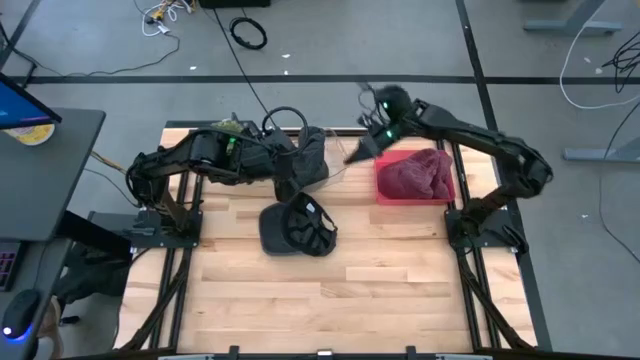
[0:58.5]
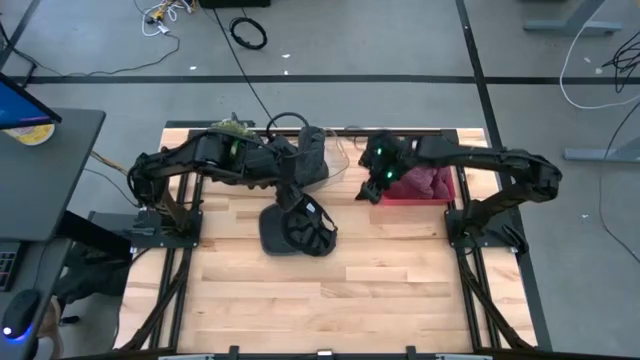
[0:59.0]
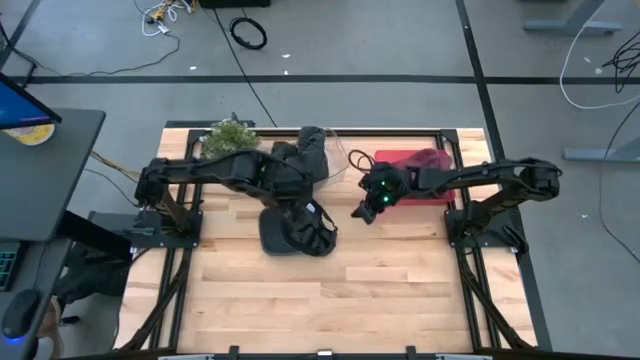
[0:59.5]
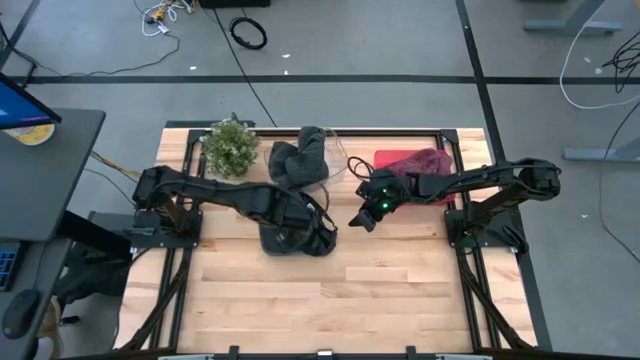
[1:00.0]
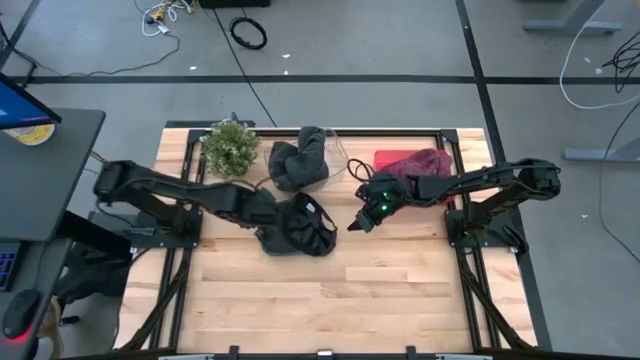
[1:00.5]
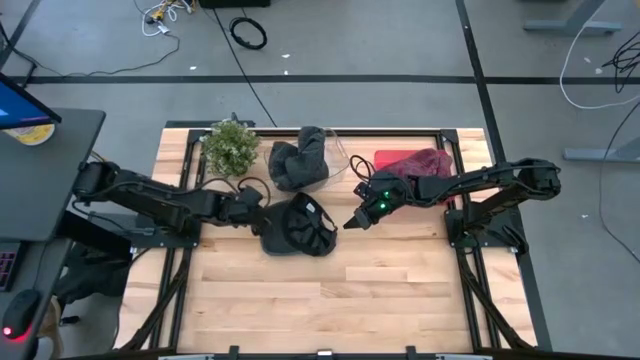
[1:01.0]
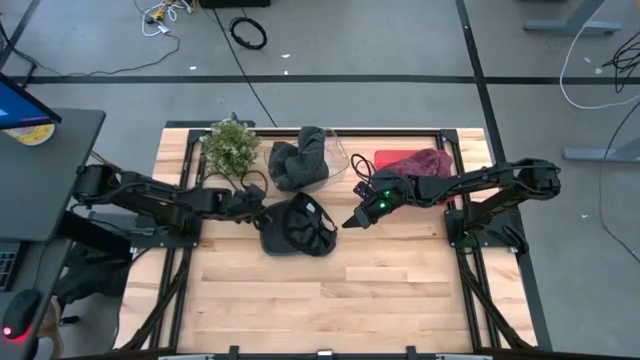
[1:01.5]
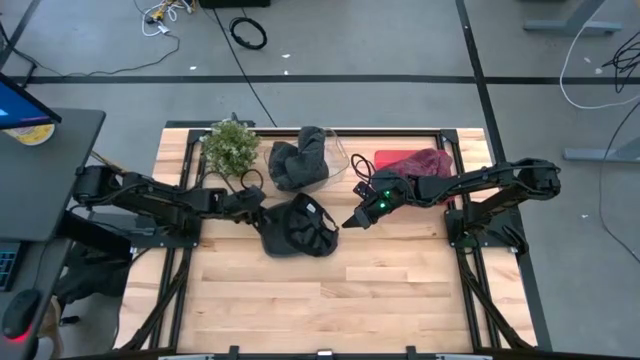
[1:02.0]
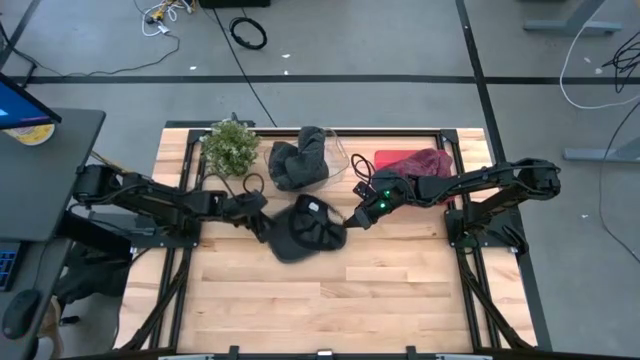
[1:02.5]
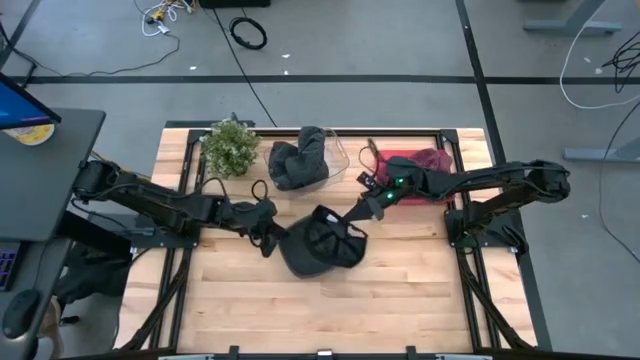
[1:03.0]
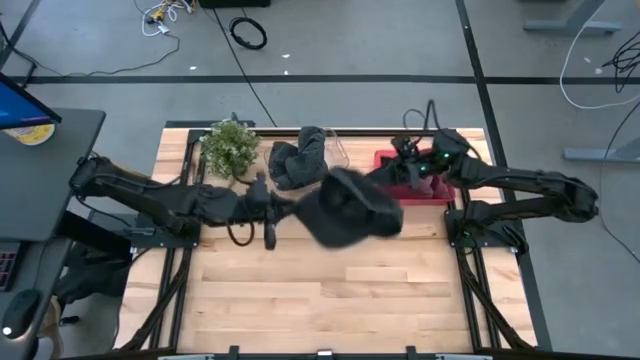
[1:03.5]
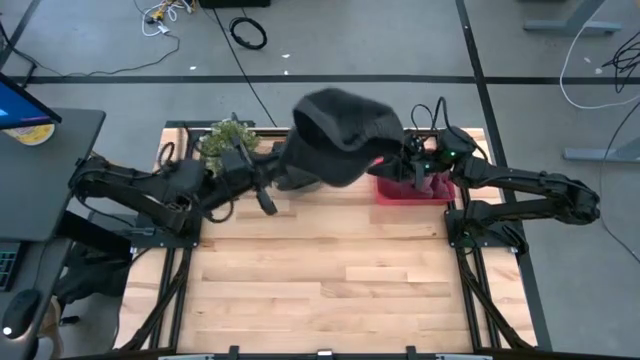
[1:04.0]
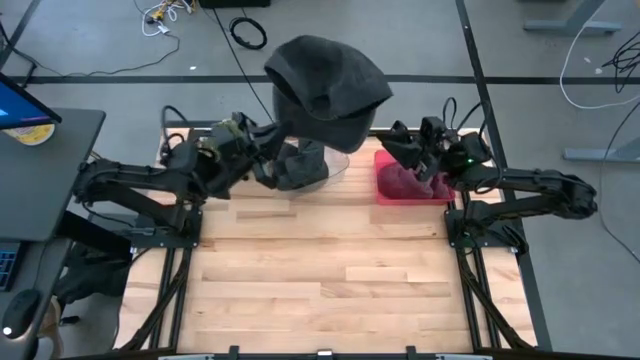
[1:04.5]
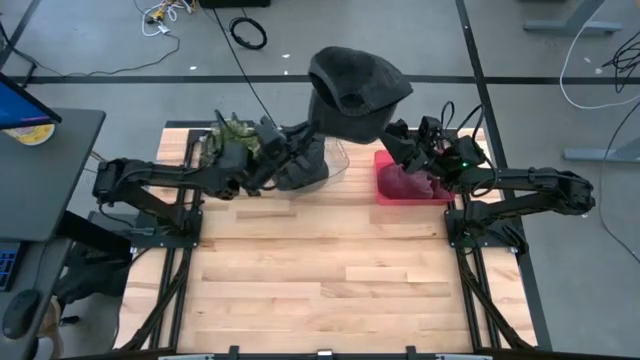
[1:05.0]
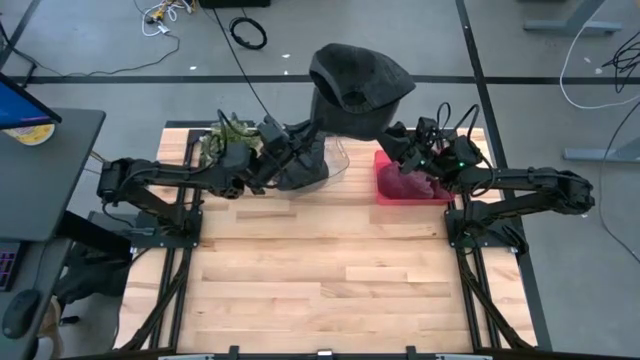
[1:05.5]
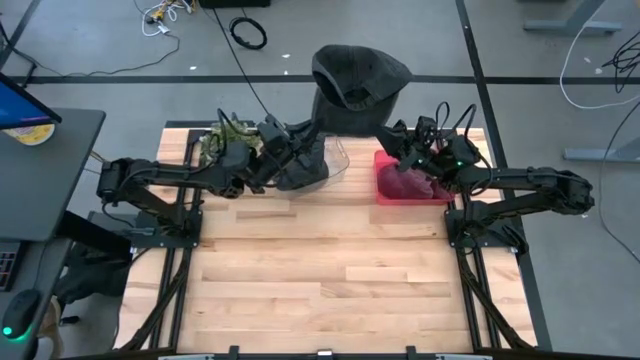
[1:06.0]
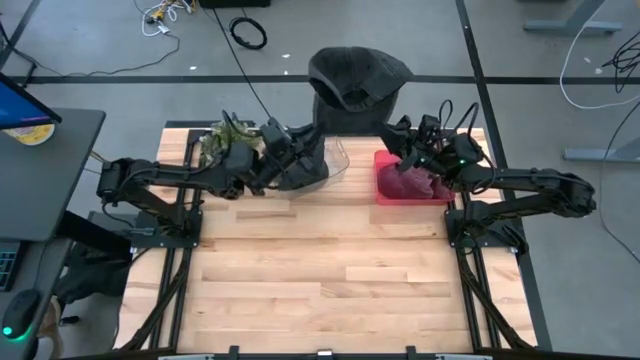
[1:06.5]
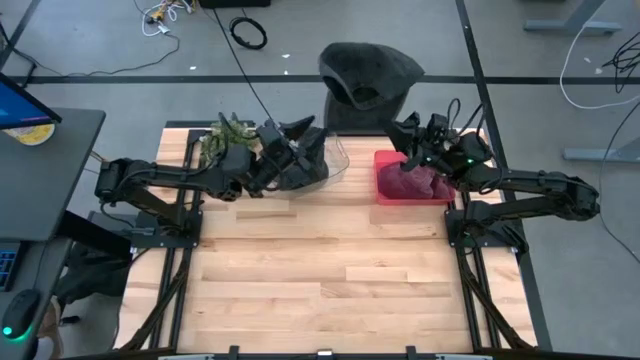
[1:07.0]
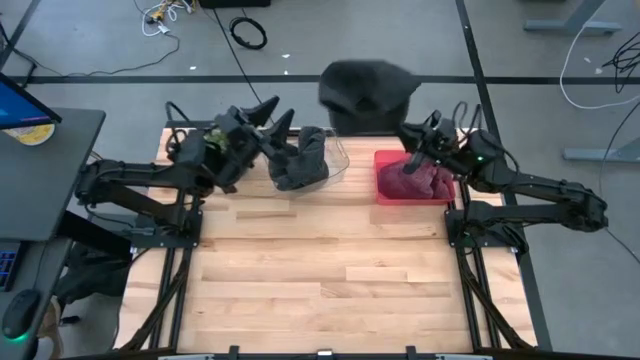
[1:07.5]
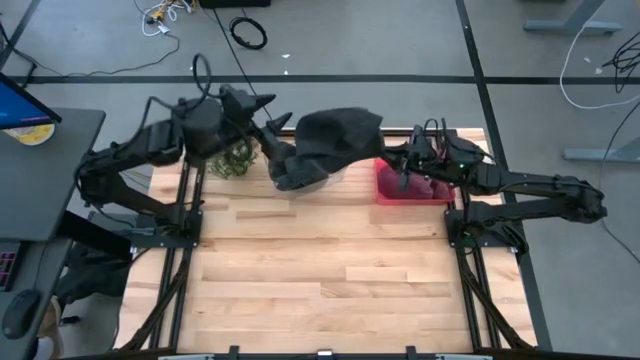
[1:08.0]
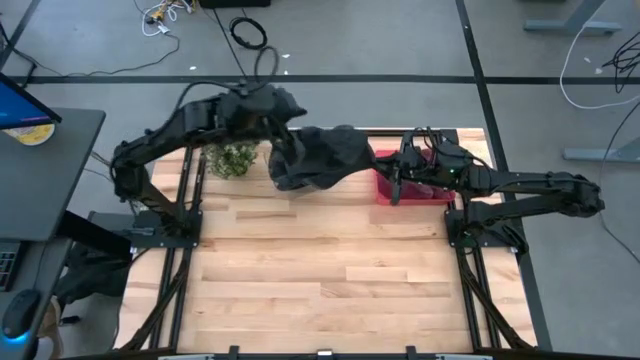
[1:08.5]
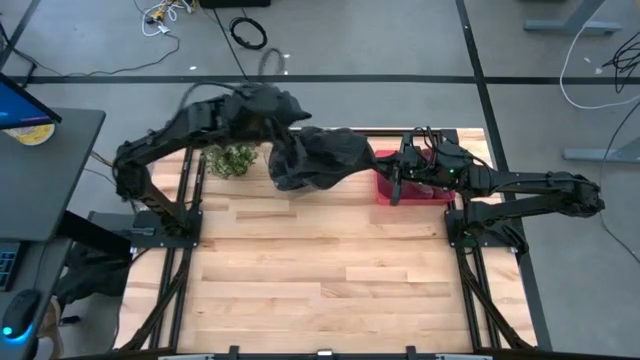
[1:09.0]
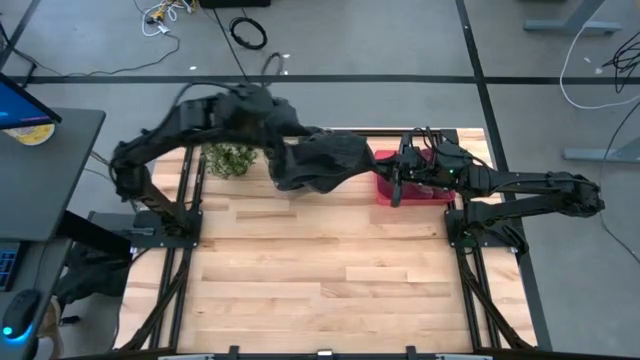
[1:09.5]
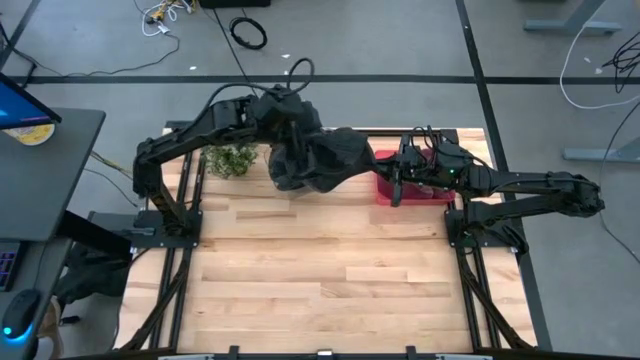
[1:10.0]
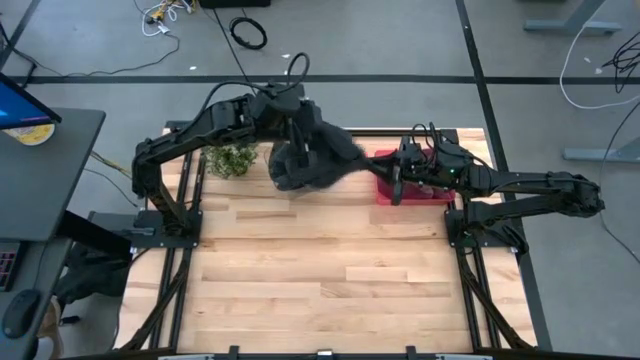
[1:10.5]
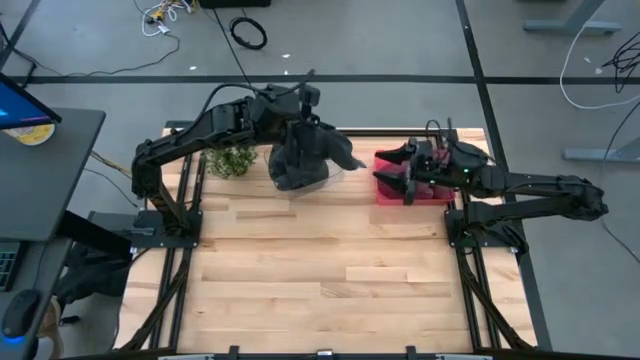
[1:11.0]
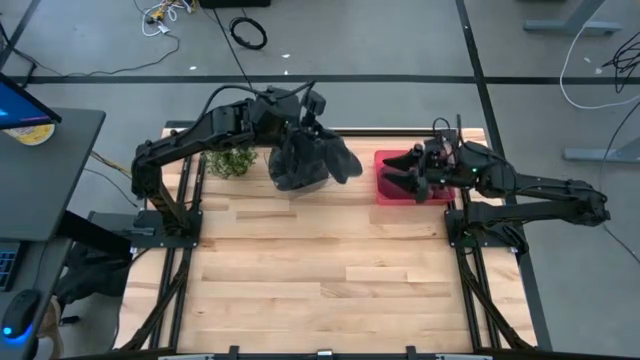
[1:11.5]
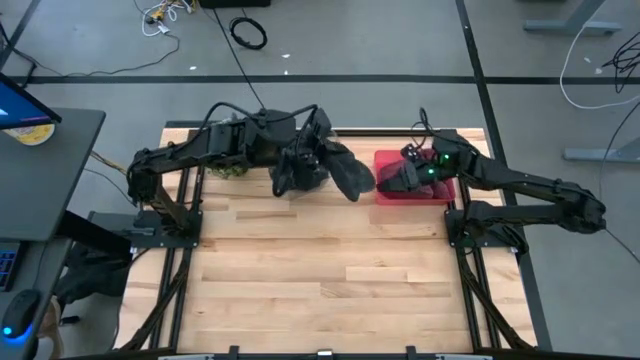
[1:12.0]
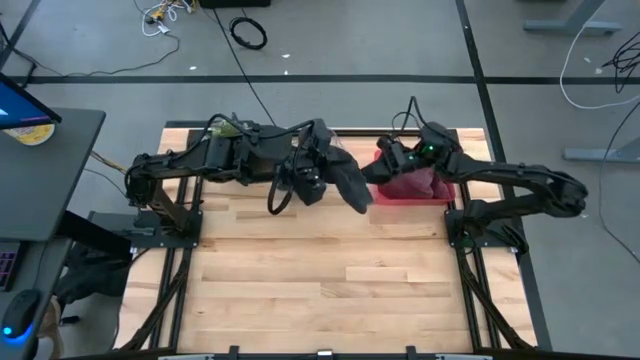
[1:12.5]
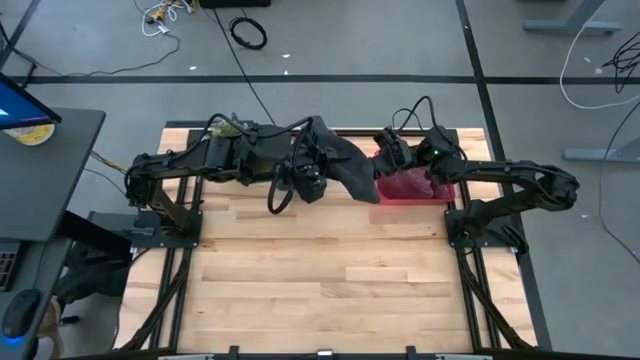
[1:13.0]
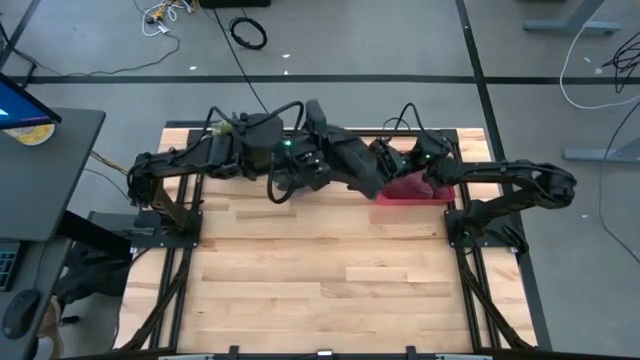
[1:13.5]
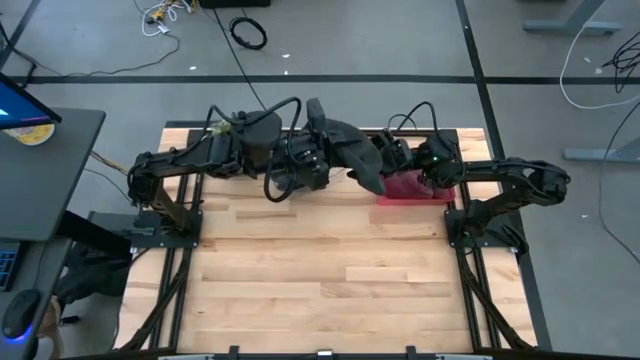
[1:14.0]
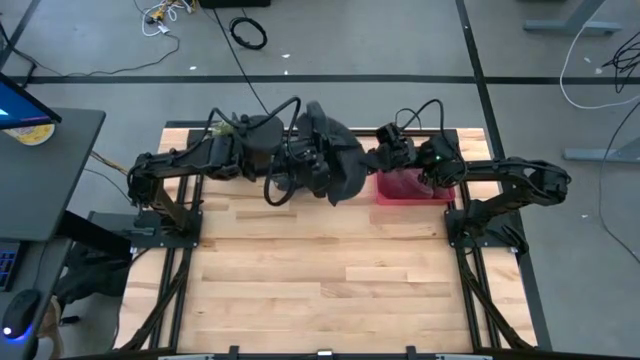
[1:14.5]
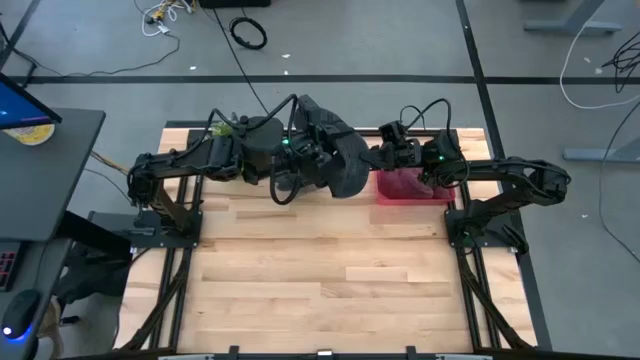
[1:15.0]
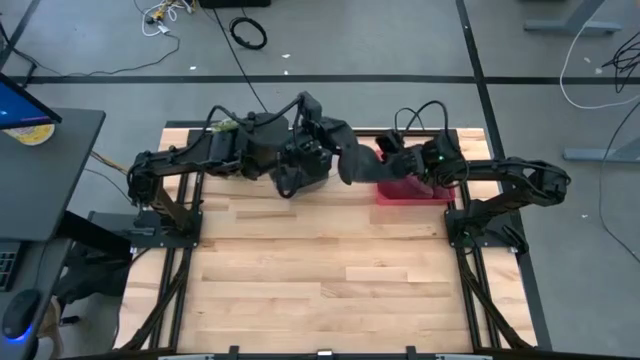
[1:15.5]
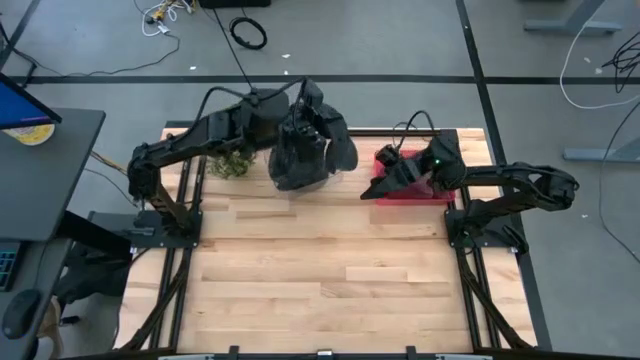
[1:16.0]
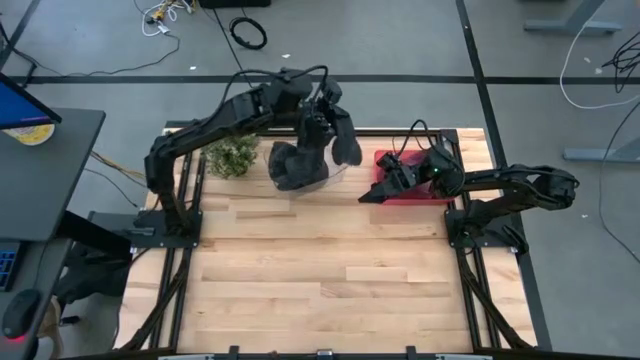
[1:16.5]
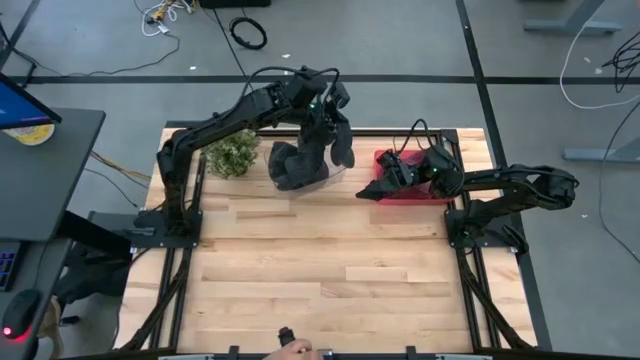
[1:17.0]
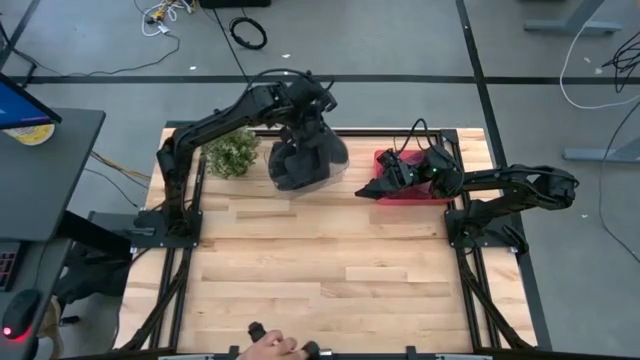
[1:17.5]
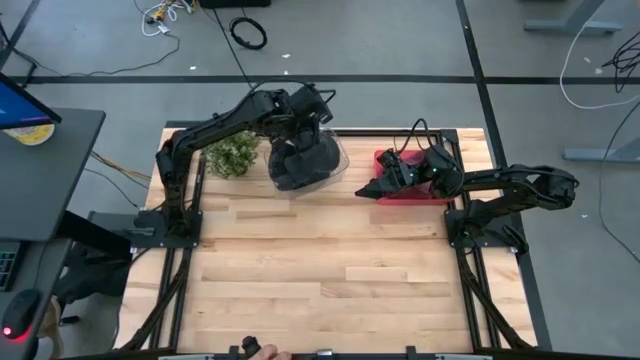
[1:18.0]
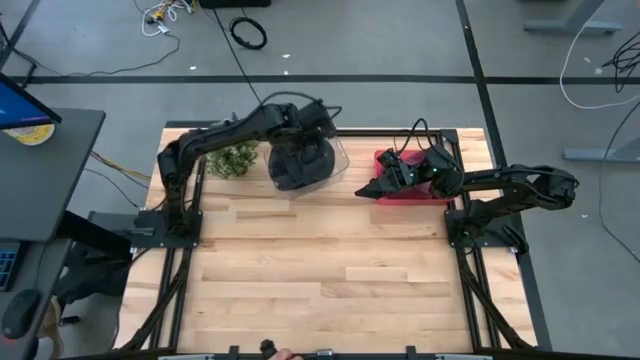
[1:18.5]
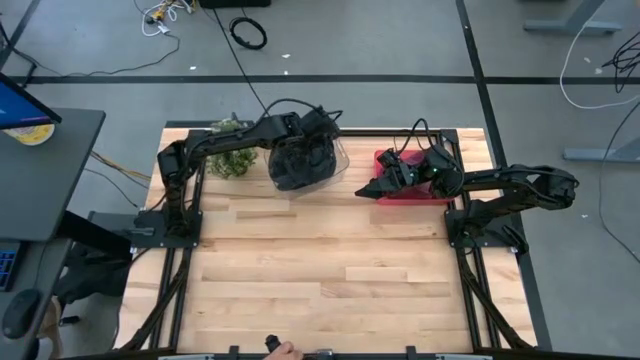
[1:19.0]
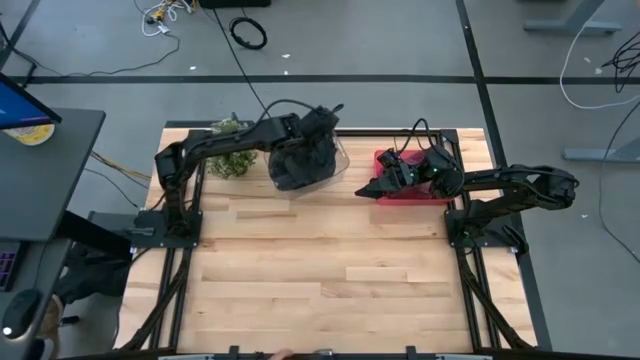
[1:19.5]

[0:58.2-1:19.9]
Task: Pick & Place hat
Put the black cap into the transparent bin
